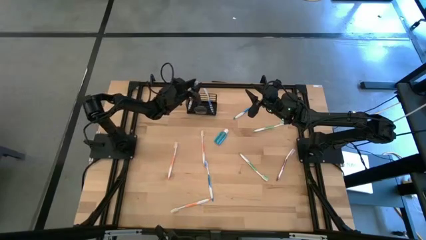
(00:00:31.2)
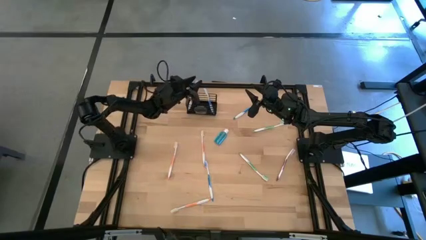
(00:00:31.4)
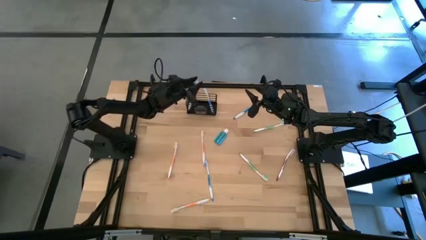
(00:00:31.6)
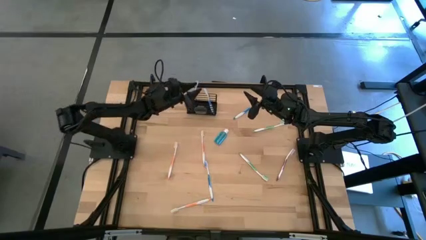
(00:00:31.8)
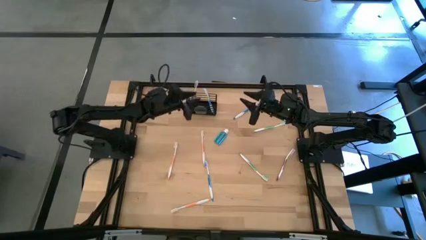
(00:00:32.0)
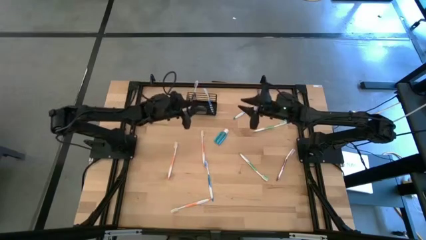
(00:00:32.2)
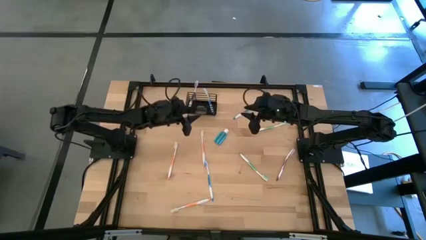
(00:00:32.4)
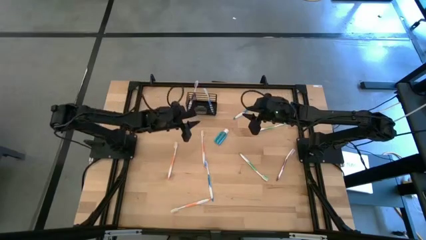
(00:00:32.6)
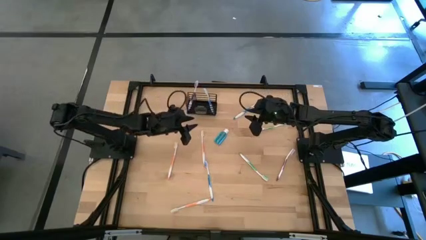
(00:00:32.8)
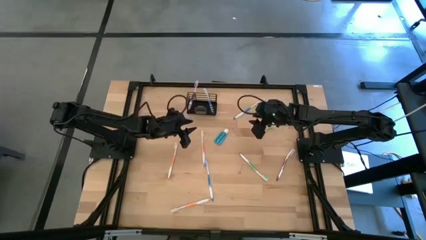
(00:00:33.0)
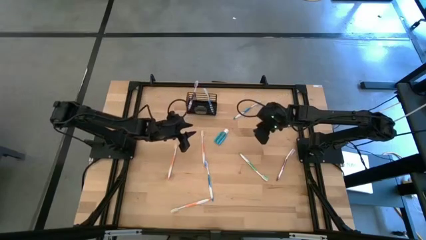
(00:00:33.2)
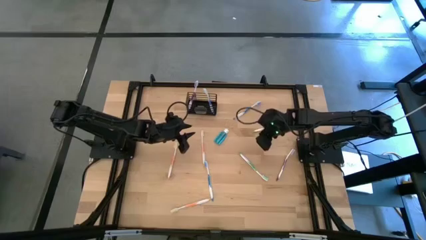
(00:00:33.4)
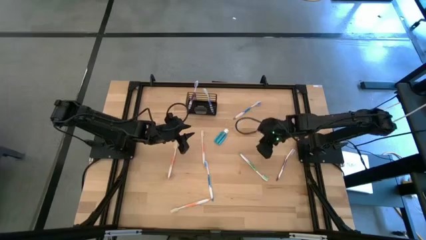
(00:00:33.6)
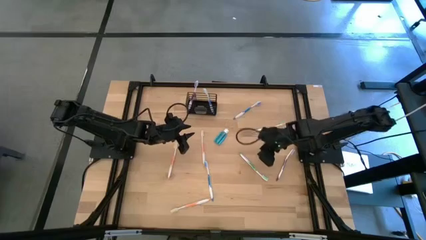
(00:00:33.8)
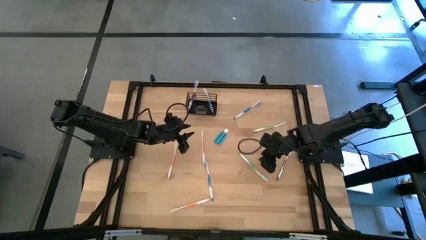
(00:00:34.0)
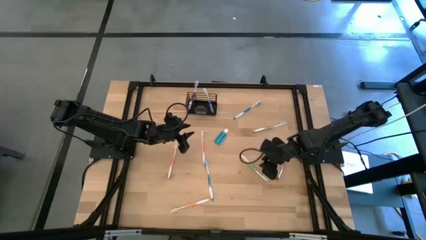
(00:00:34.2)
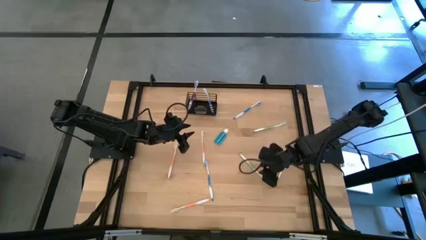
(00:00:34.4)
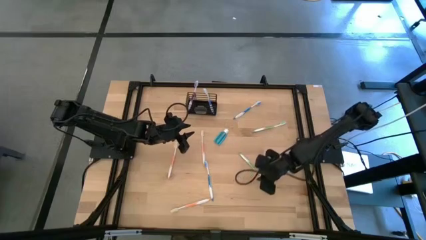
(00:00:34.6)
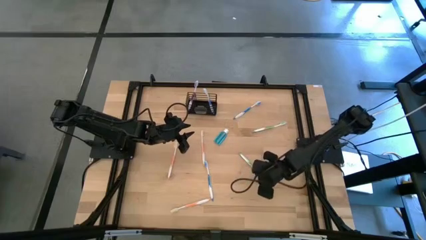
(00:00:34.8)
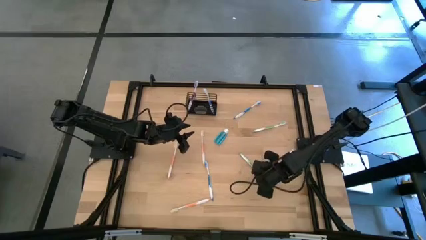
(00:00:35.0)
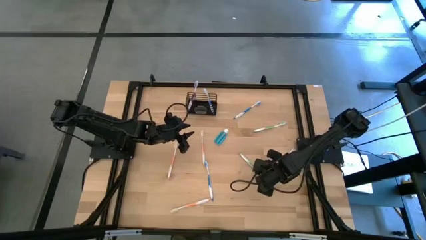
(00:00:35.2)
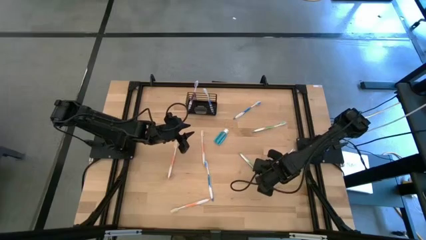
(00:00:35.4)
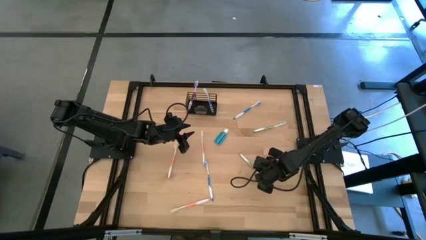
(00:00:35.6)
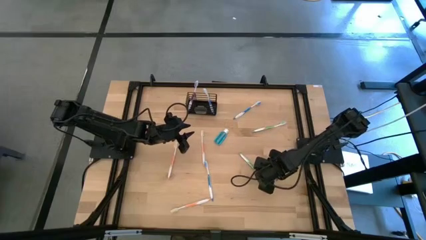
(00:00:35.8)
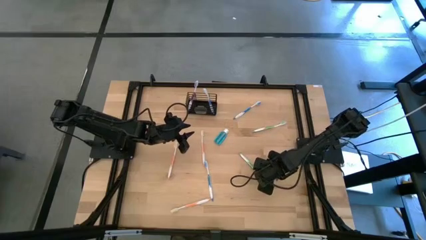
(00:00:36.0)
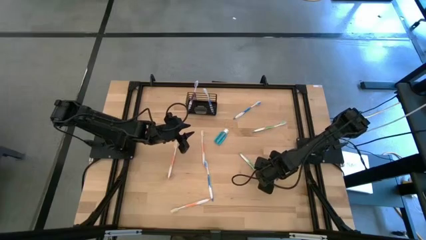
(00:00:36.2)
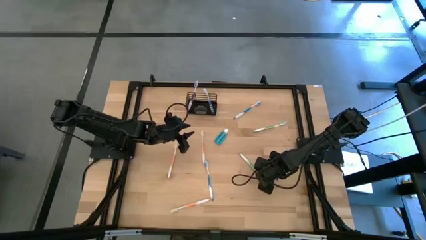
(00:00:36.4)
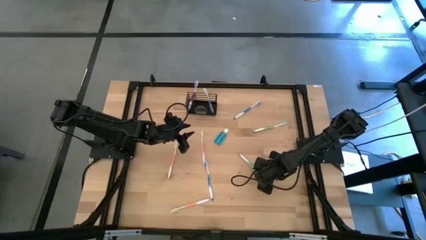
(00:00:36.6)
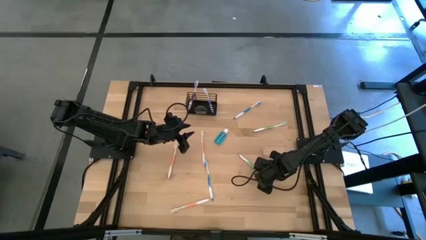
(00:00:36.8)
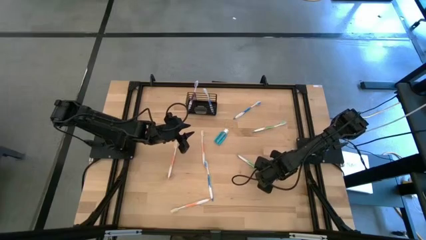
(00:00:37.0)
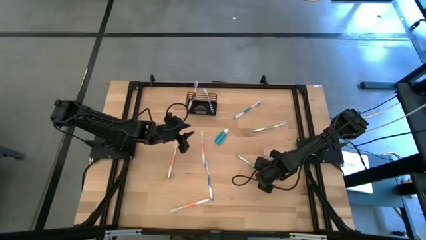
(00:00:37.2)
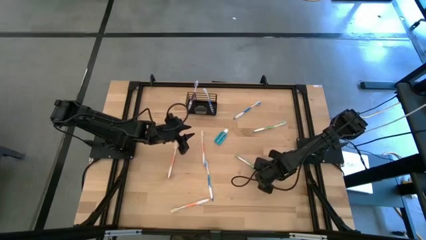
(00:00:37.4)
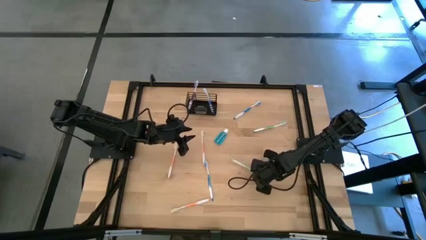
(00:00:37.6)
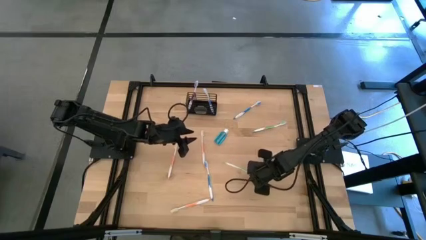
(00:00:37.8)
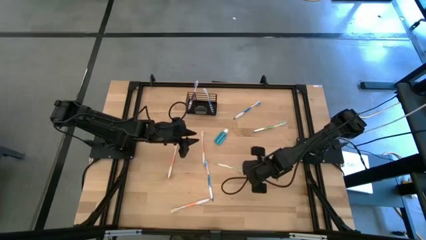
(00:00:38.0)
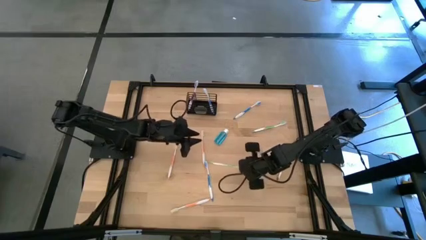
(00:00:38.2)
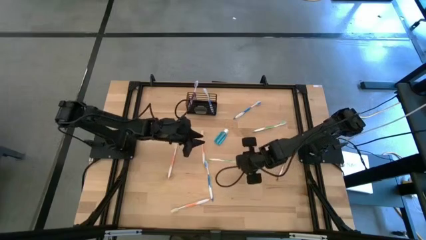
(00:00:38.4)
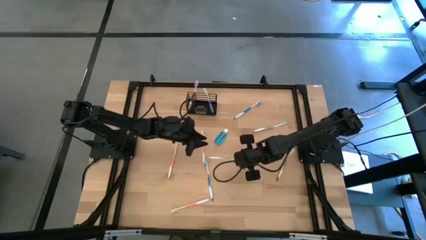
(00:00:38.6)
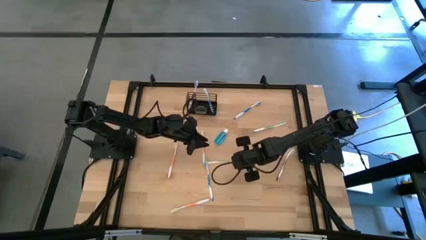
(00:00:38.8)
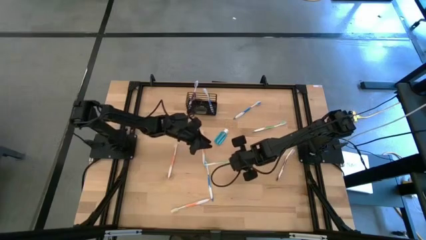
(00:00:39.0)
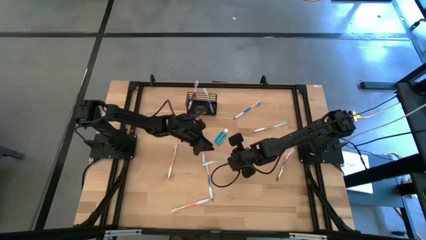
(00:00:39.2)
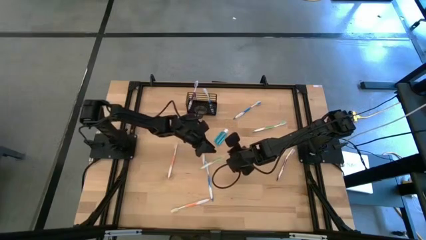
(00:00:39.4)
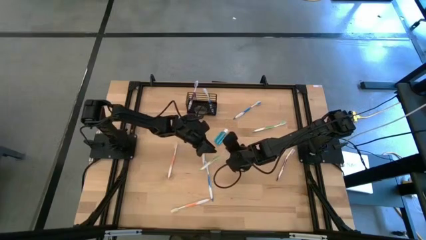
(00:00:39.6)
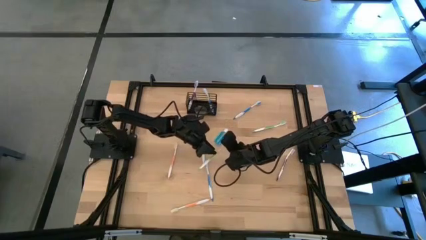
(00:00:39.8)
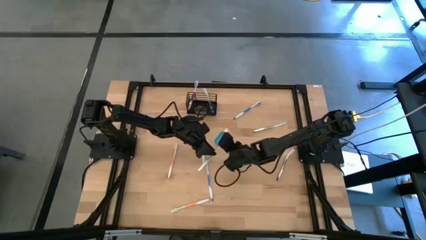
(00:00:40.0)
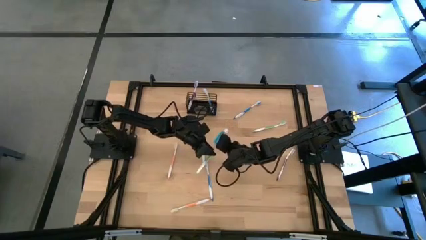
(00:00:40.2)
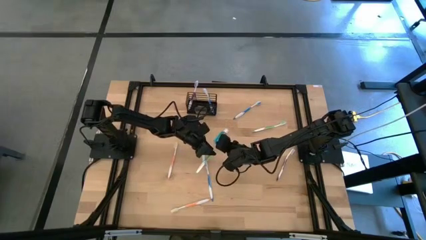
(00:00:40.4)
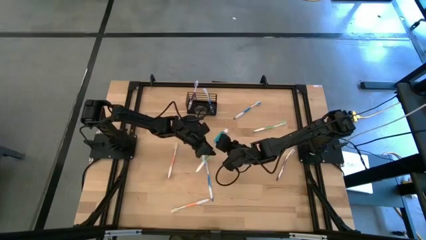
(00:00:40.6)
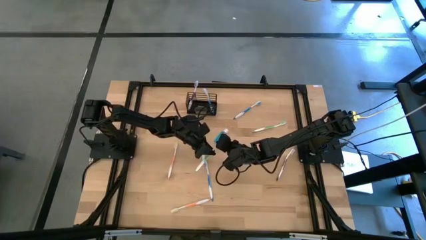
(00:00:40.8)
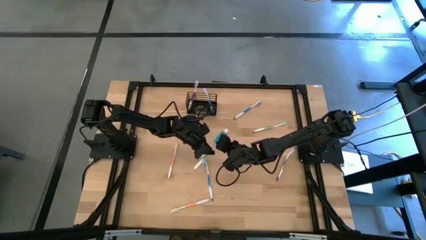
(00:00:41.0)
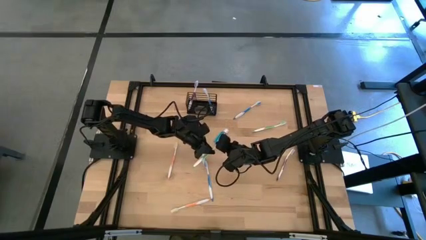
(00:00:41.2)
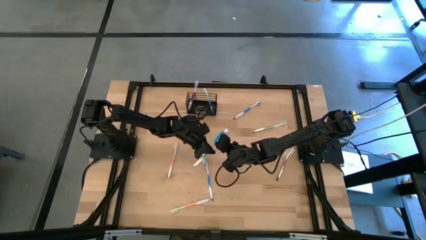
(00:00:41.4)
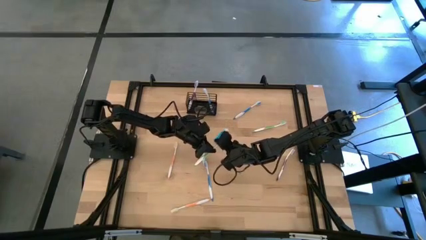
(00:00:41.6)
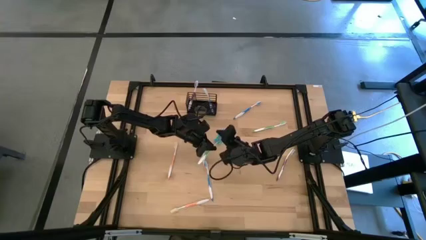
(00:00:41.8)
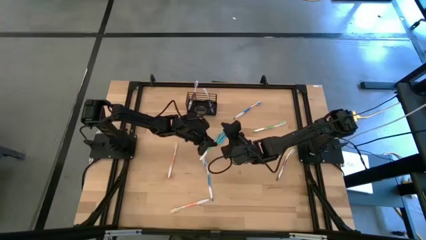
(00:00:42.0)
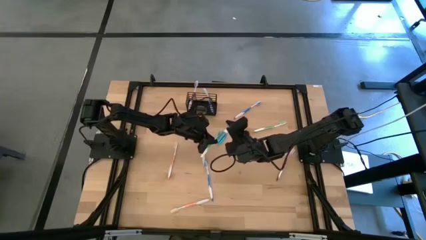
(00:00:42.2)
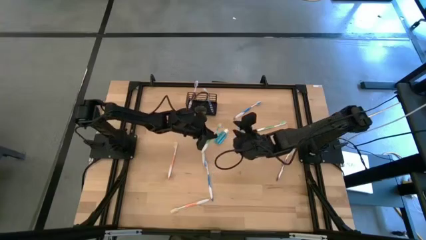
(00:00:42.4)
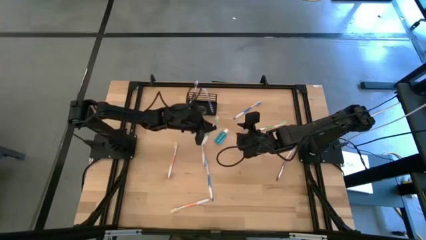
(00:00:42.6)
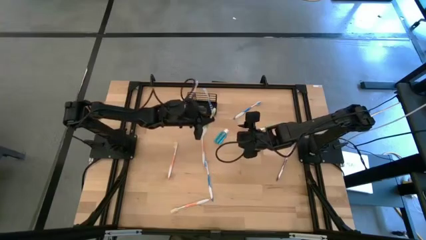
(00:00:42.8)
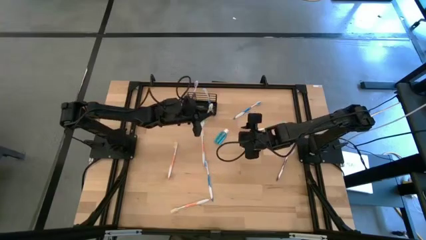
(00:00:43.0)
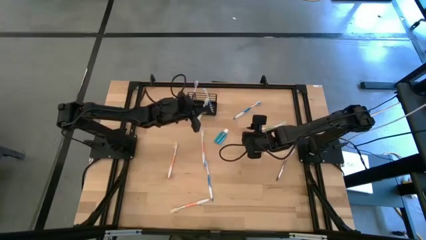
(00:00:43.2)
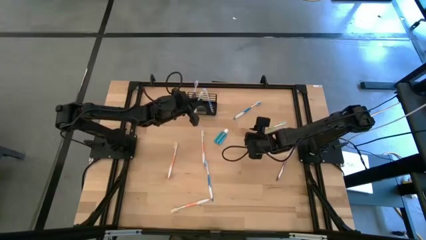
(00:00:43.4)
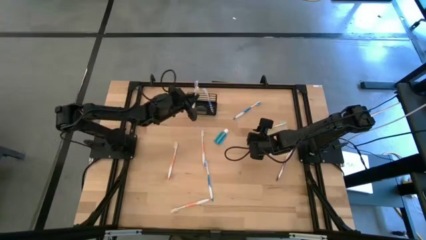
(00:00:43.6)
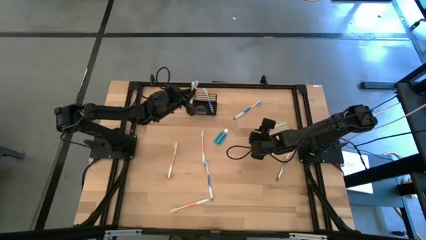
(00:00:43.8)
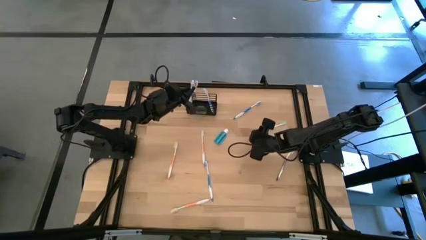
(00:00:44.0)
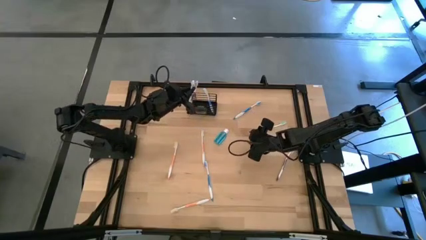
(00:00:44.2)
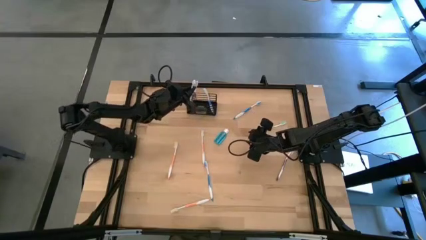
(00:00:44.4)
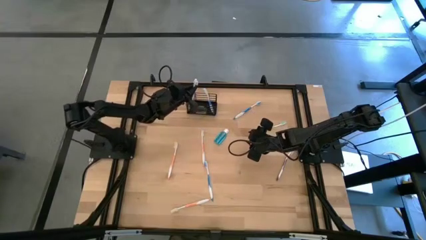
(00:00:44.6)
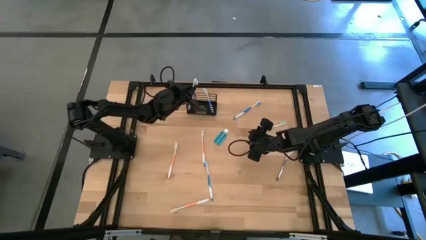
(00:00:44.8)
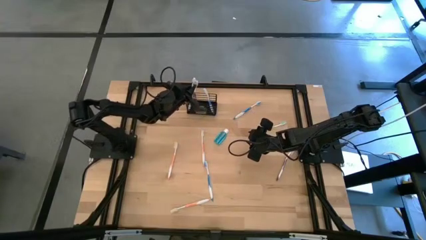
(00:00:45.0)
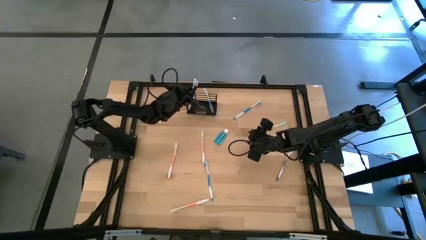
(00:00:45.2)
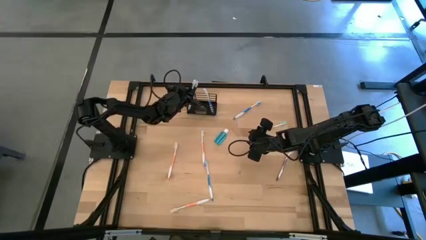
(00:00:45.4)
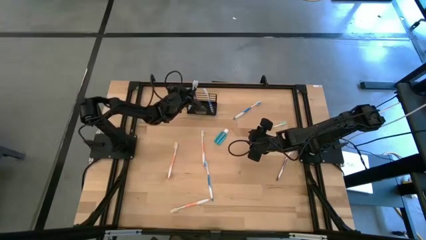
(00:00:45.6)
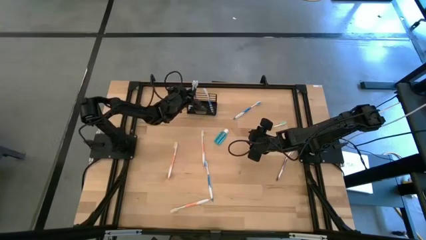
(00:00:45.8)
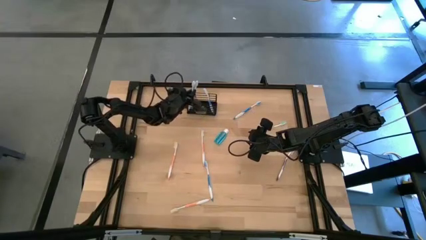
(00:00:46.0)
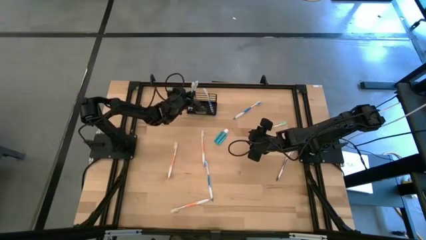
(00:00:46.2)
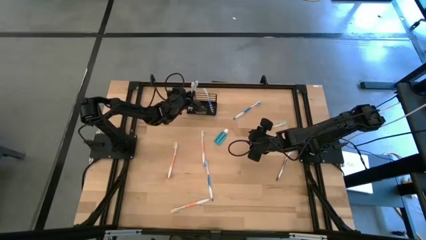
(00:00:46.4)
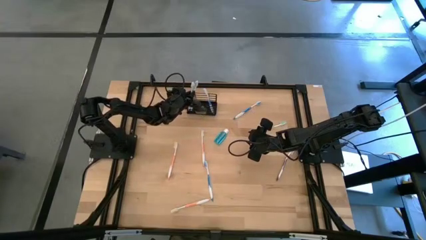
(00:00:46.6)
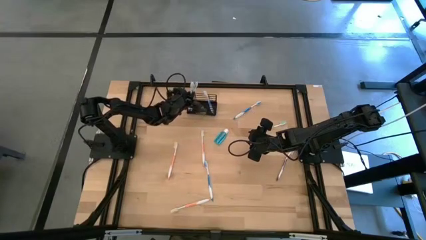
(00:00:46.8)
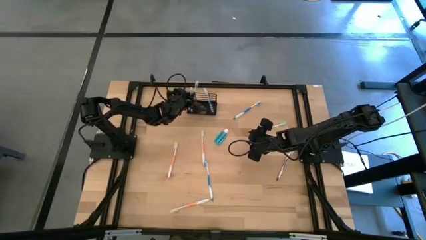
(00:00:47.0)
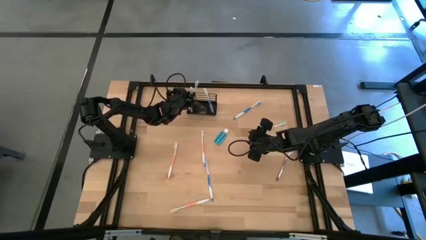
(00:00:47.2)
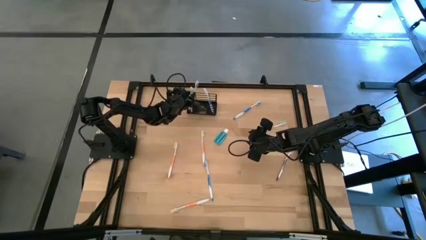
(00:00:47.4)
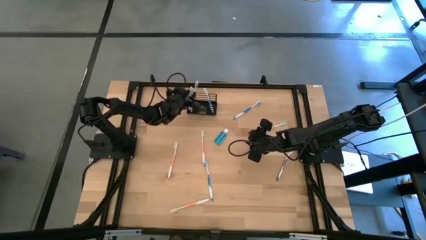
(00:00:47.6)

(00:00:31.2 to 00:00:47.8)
Task: Pick & Place toothbrushing station
Put the bottom green toothbrush into the black wire organizer
